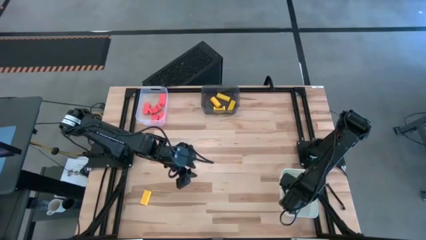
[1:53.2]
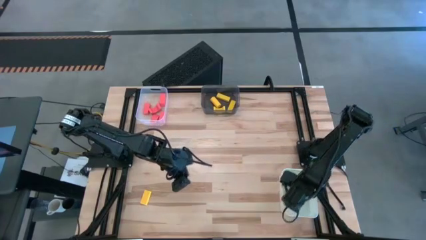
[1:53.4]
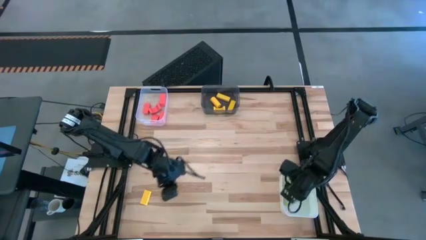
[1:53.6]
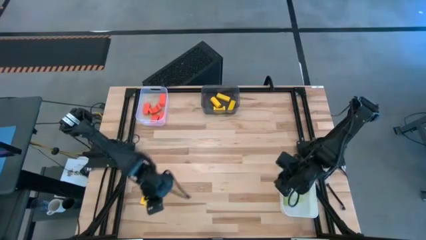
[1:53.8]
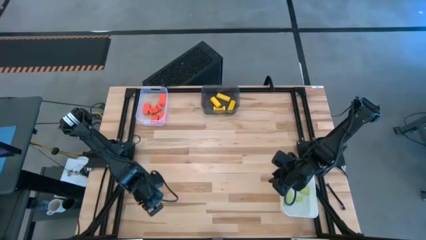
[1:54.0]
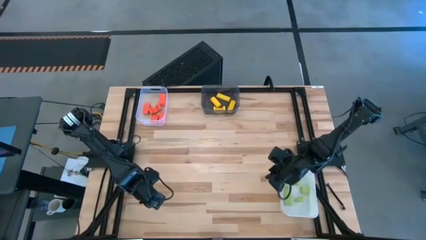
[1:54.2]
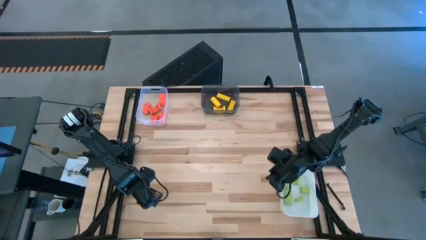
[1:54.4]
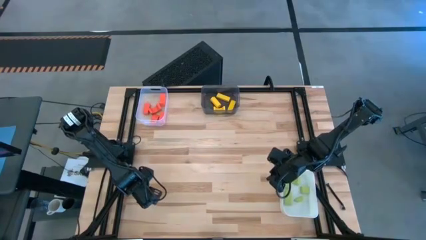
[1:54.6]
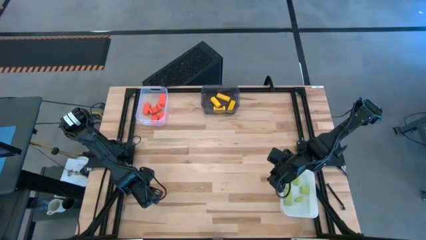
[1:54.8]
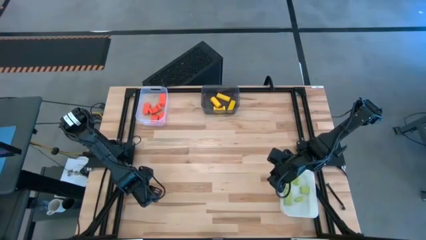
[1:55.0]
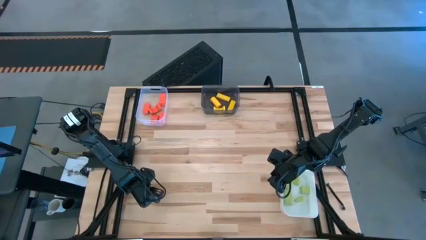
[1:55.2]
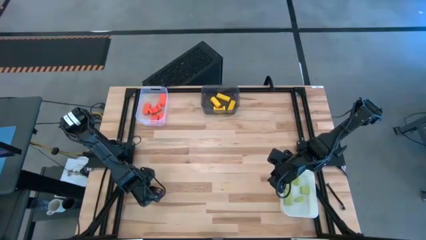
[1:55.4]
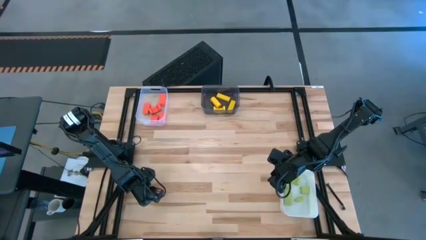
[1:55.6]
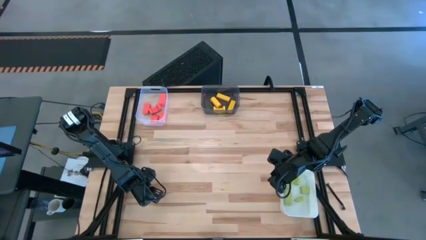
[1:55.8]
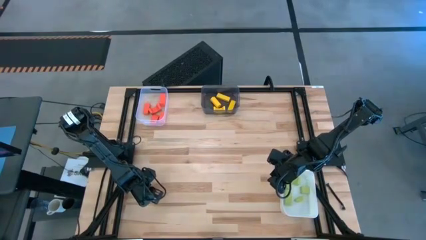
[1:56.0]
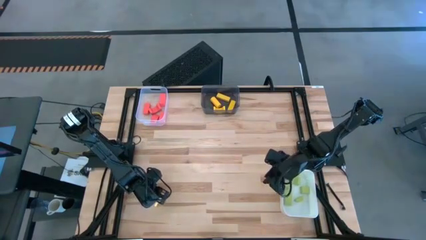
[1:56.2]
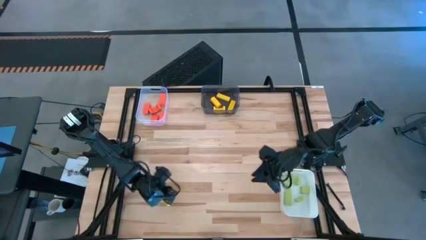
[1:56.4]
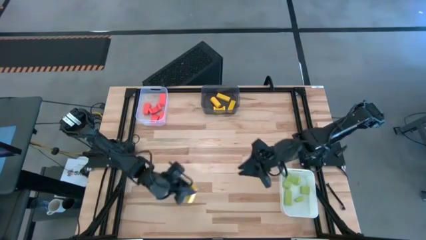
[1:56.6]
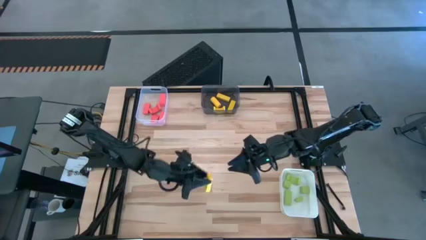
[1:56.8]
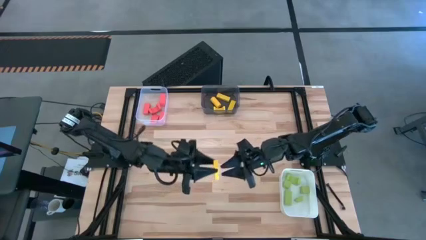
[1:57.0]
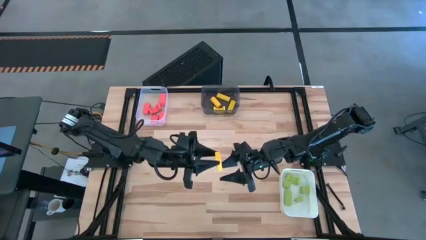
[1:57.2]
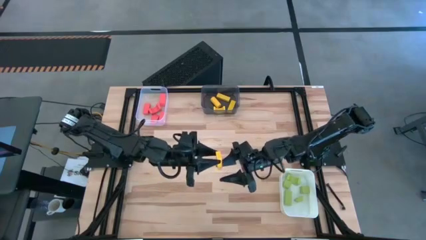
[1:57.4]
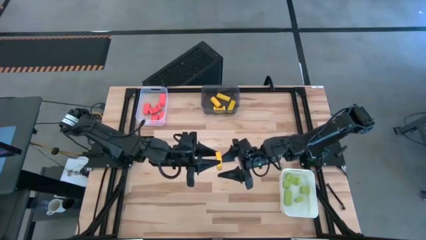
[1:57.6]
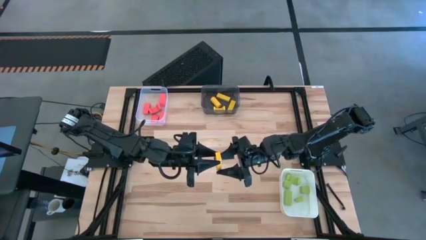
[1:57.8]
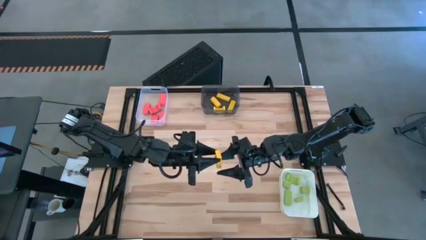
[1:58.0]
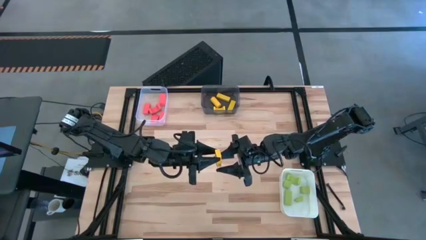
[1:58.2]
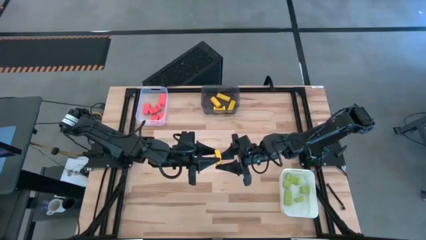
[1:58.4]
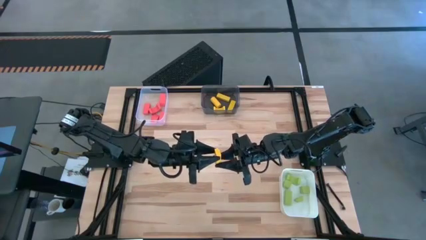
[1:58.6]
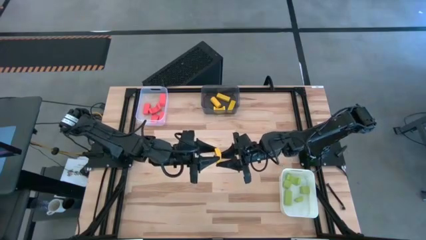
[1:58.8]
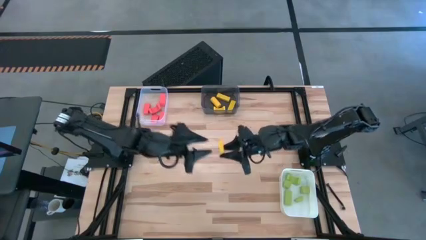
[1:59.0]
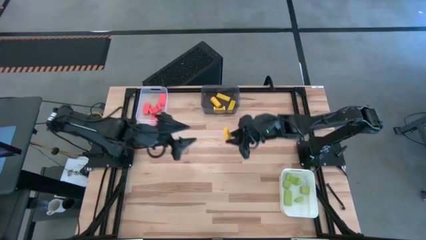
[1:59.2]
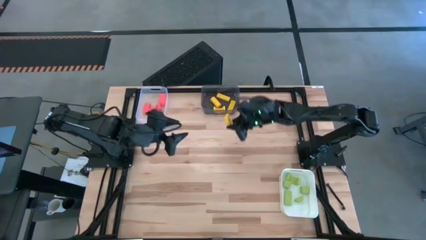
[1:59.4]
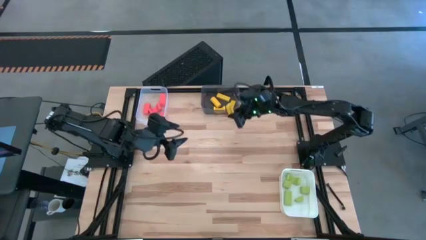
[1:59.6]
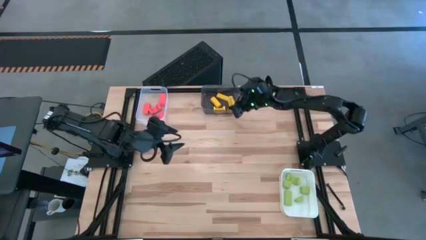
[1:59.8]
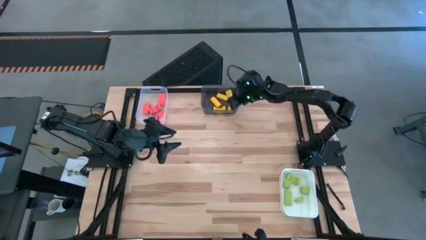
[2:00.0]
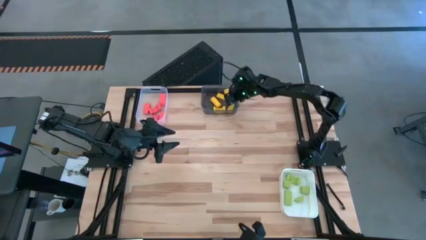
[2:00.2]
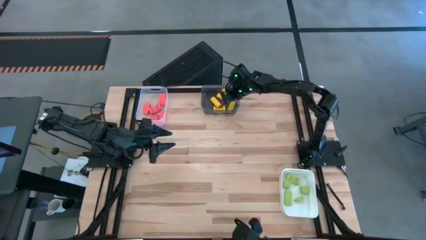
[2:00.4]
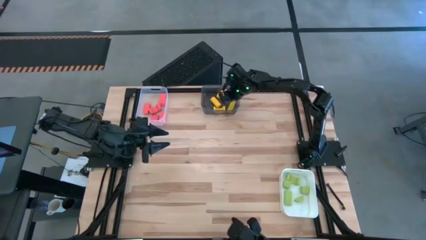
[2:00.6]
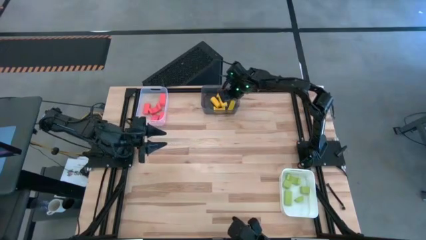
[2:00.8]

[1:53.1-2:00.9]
Task: Sort & place blocks by color
Put the yellow block into the black bin

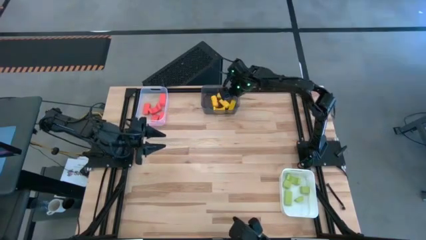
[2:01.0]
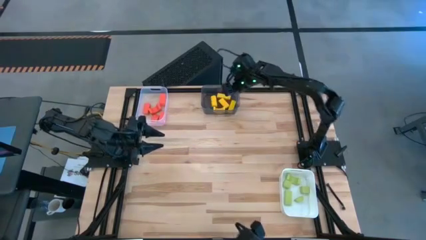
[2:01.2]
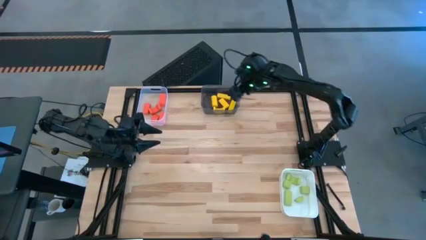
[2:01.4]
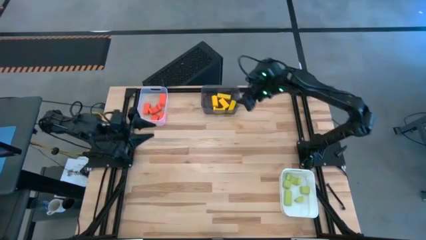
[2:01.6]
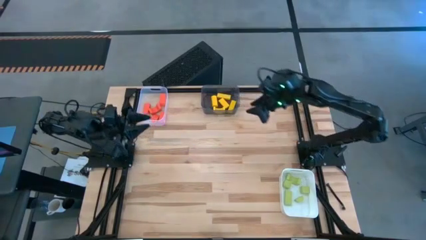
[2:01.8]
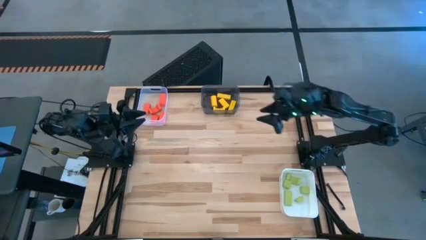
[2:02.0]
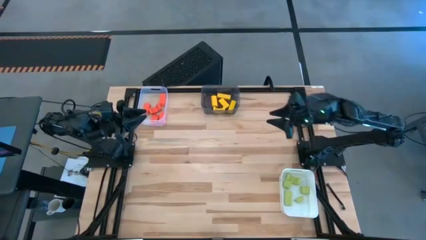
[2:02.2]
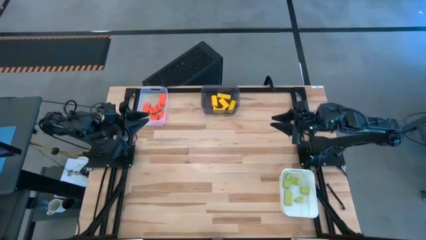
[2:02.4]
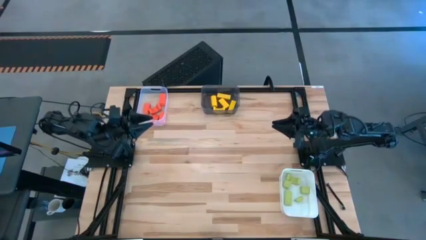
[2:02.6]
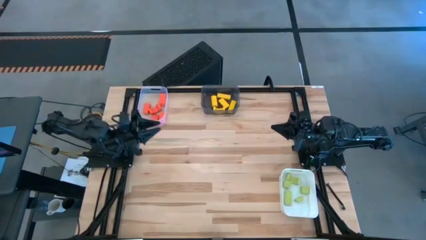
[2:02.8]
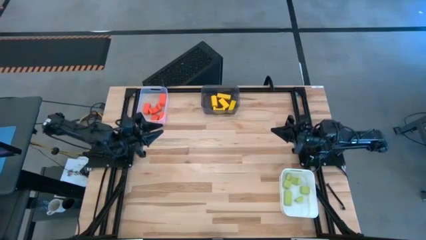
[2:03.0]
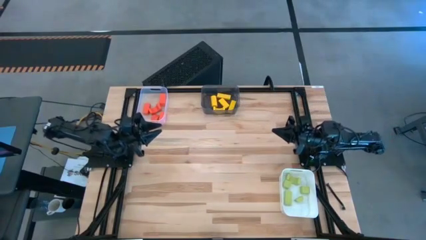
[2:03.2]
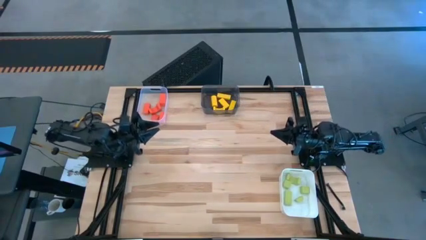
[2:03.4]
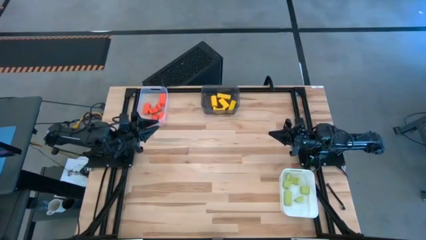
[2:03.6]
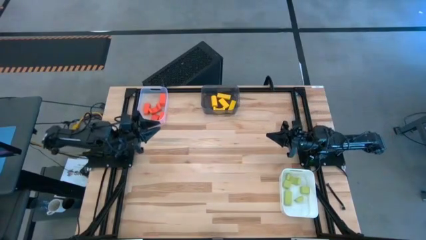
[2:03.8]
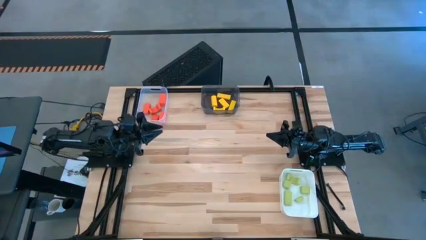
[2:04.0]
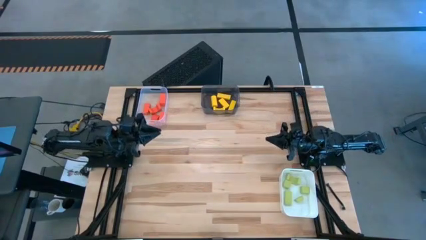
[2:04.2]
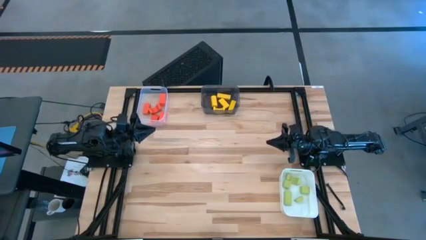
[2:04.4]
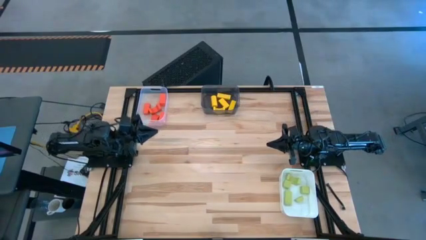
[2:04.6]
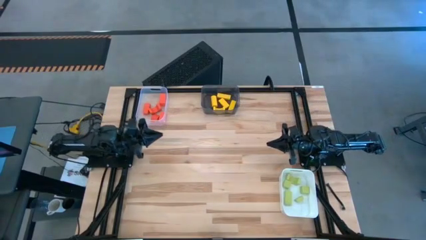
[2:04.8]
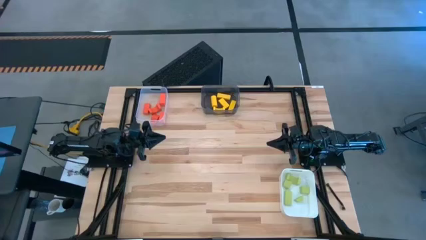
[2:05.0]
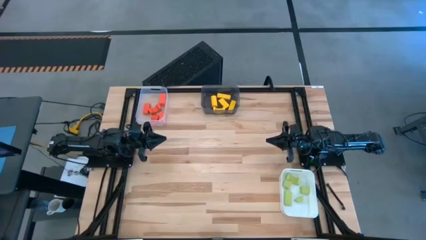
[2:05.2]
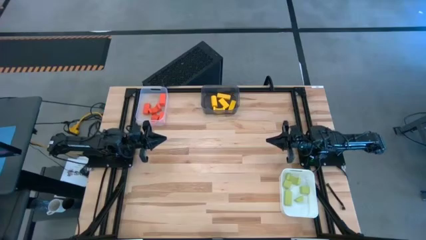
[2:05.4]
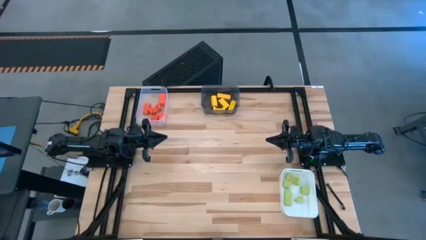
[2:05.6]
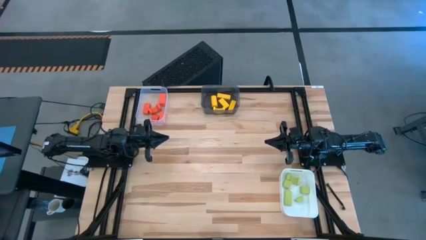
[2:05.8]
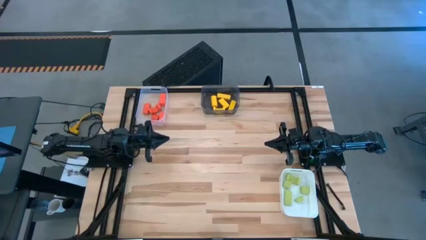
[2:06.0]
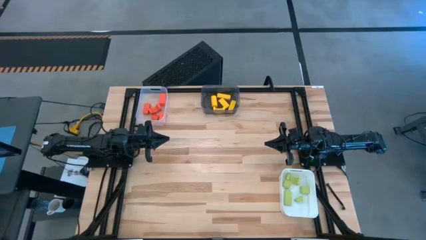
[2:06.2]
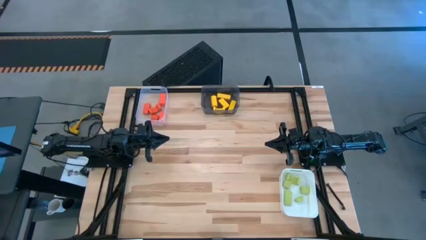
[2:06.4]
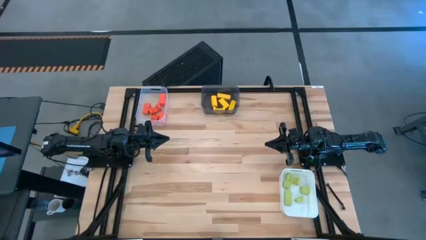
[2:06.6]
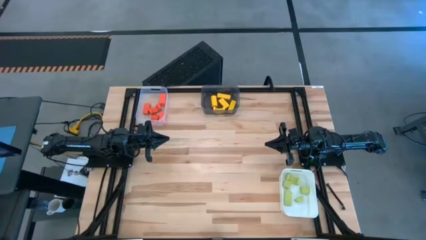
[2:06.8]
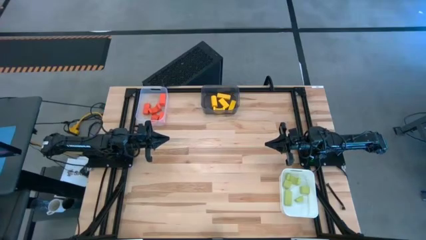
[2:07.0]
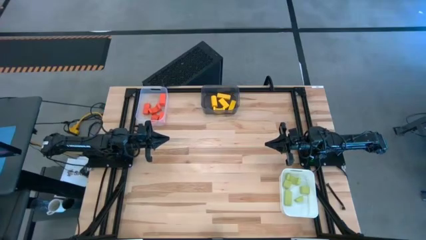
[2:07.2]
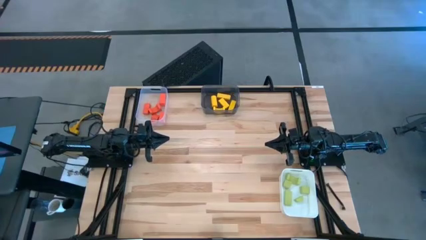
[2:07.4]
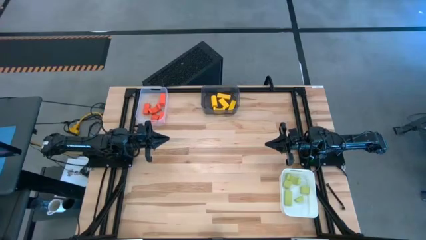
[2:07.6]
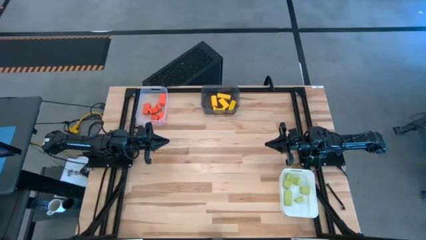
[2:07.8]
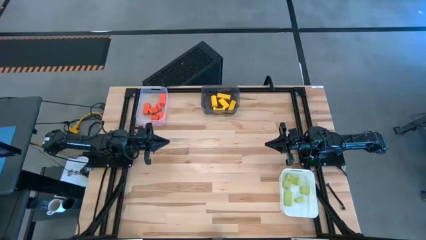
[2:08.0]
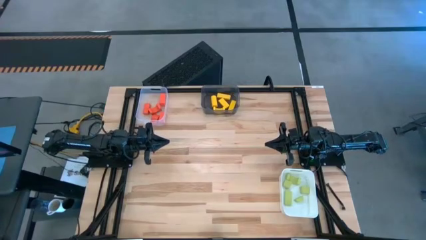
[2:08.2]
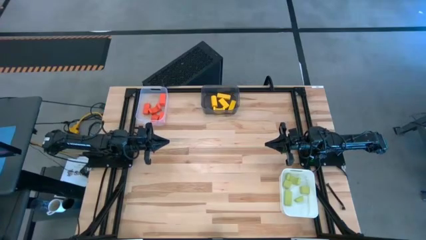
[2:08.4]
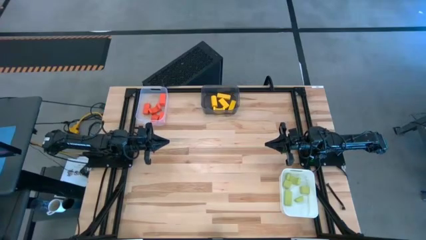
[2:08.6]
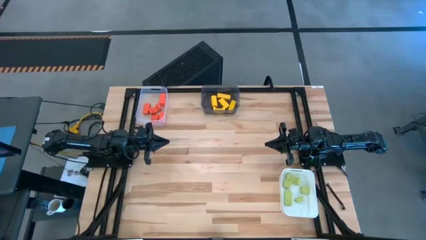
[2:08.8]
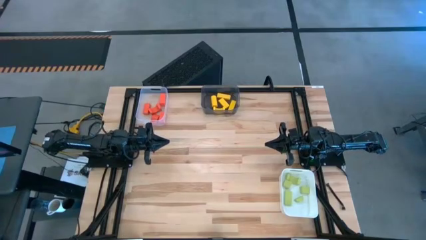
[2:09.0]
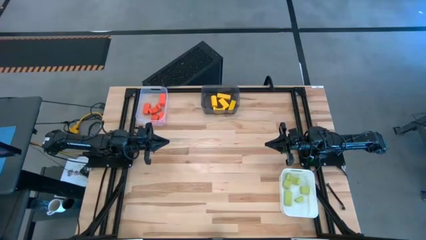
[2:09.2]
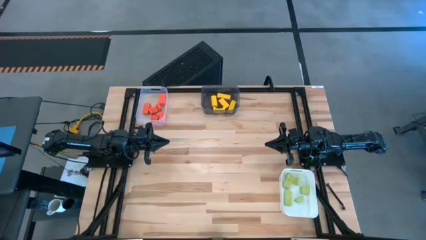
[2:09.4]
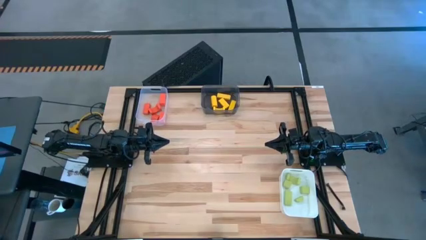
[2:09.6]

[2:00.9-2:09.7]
Return to Home Position
